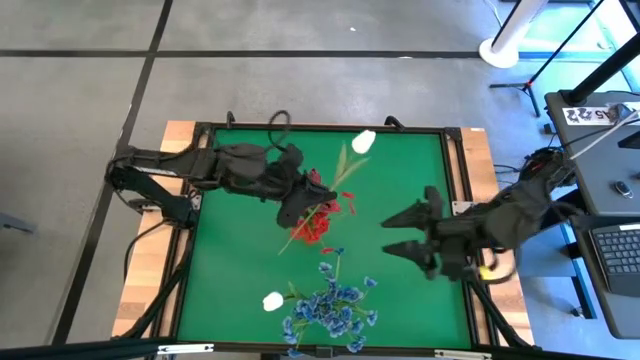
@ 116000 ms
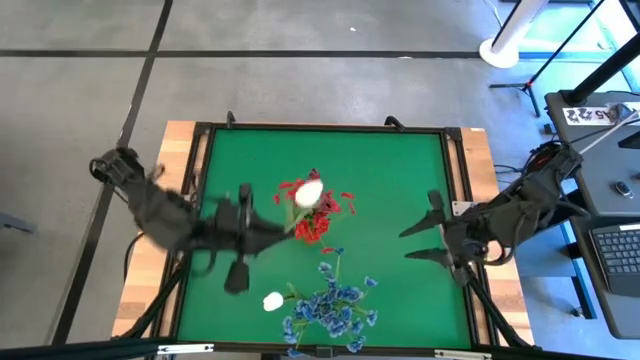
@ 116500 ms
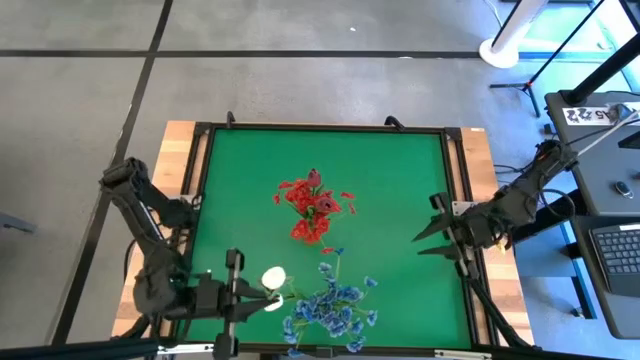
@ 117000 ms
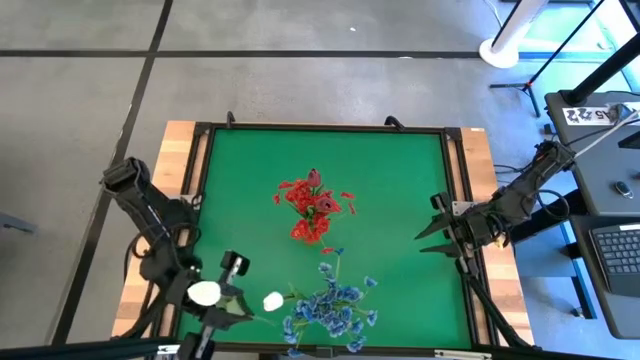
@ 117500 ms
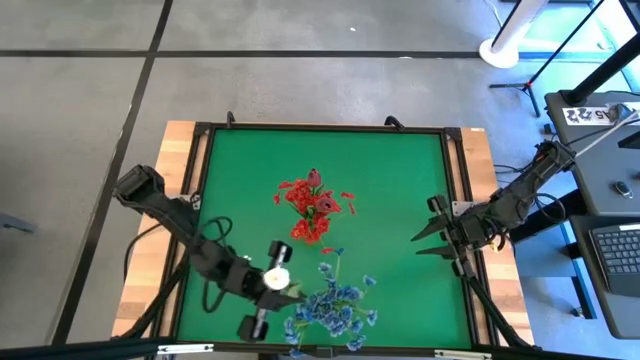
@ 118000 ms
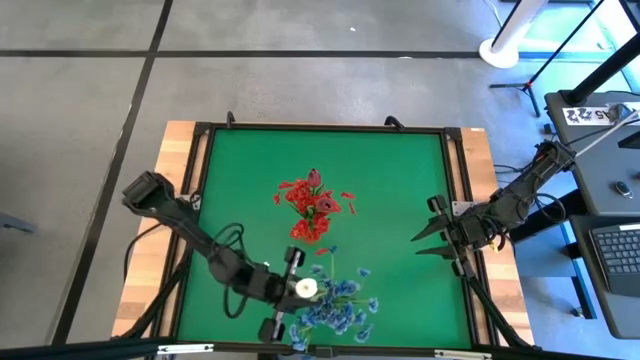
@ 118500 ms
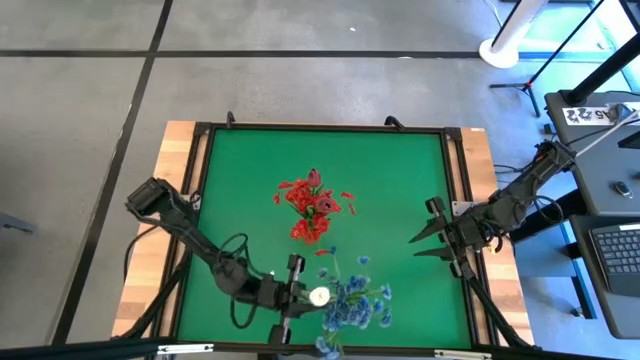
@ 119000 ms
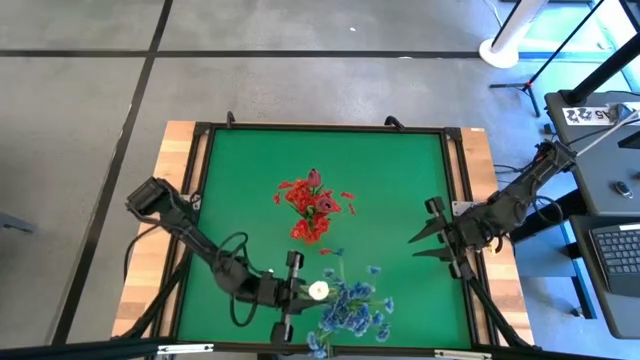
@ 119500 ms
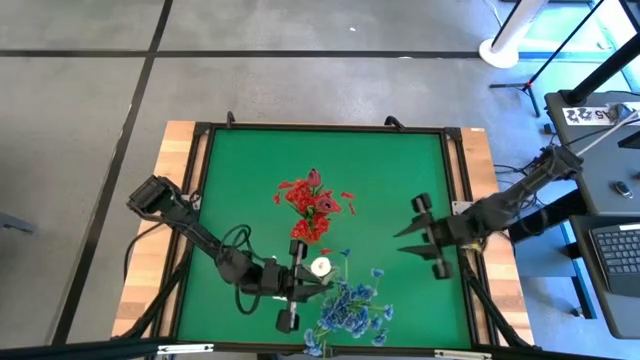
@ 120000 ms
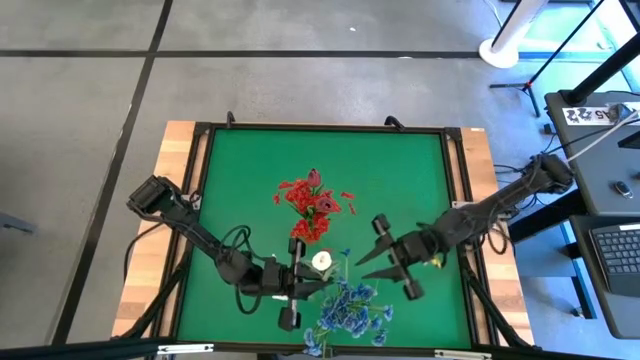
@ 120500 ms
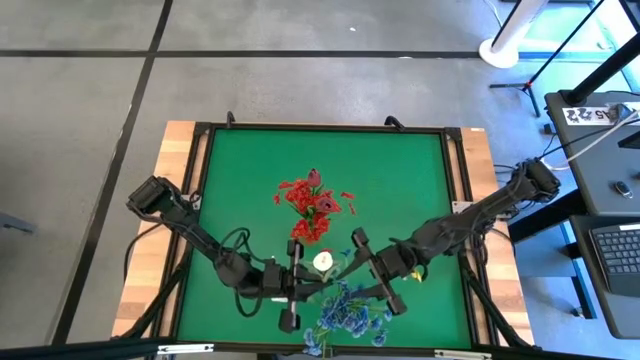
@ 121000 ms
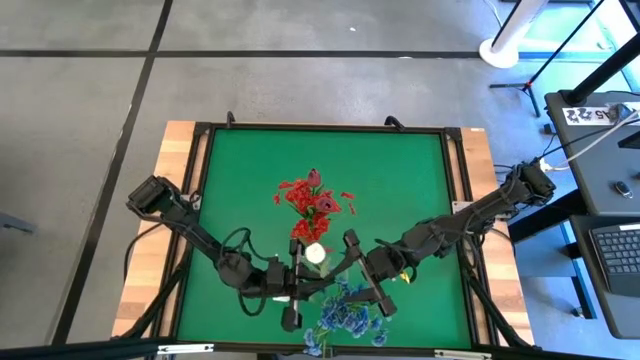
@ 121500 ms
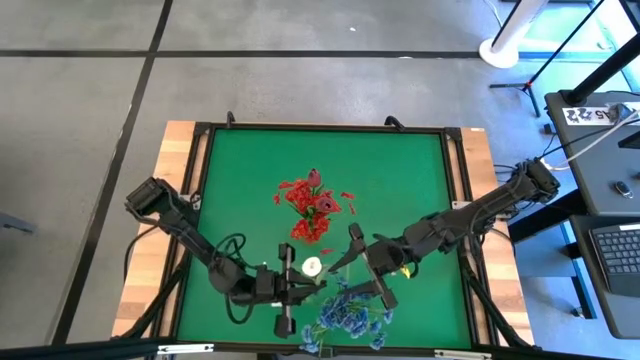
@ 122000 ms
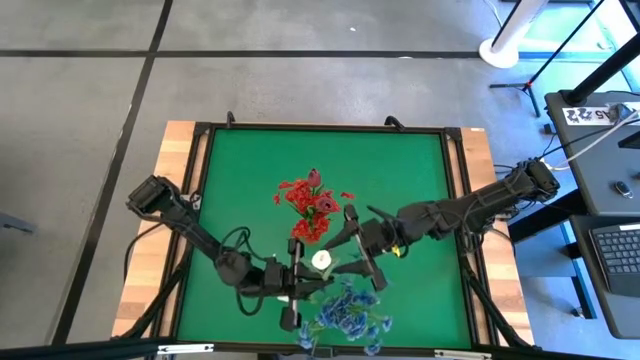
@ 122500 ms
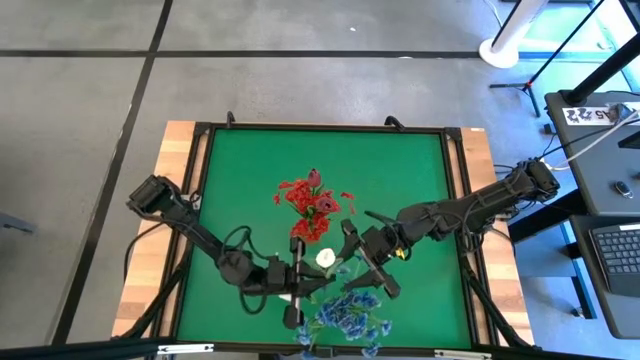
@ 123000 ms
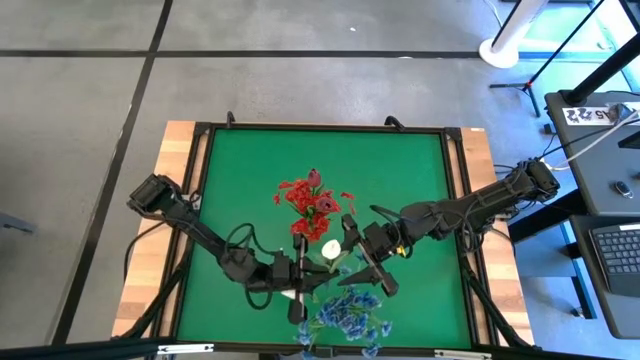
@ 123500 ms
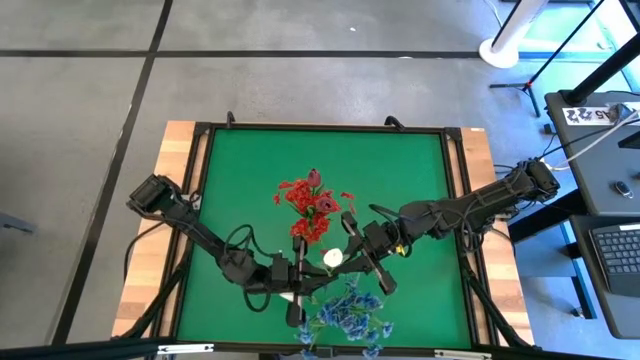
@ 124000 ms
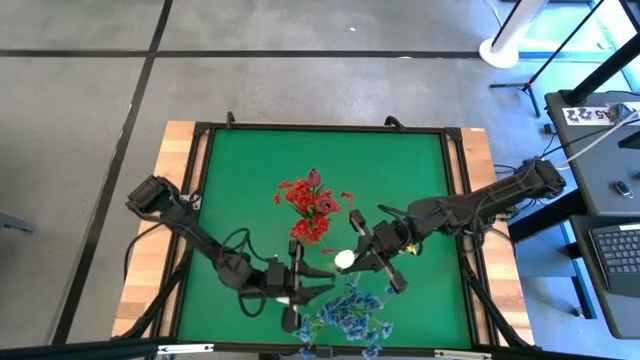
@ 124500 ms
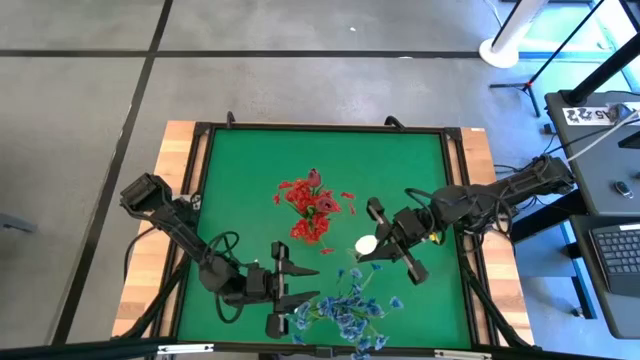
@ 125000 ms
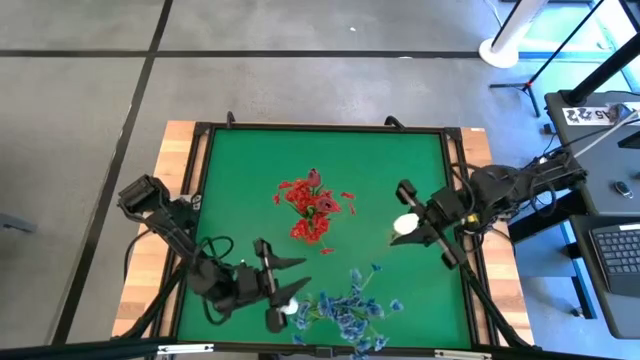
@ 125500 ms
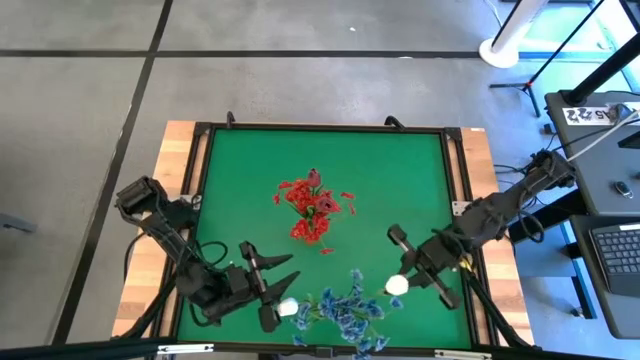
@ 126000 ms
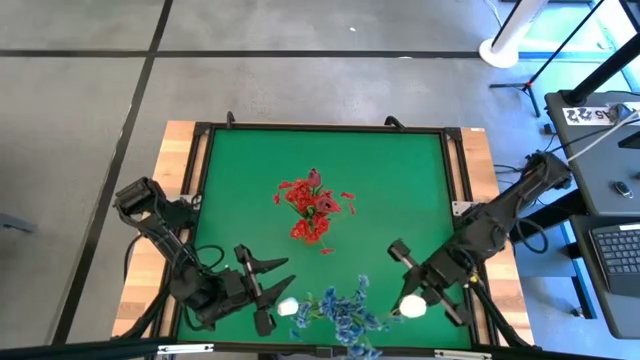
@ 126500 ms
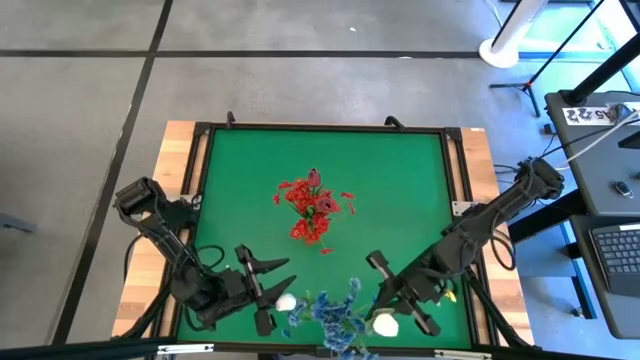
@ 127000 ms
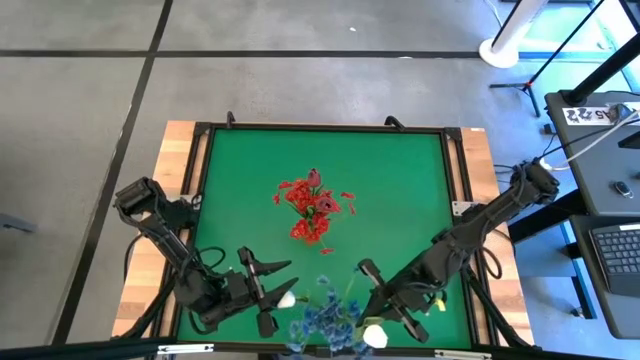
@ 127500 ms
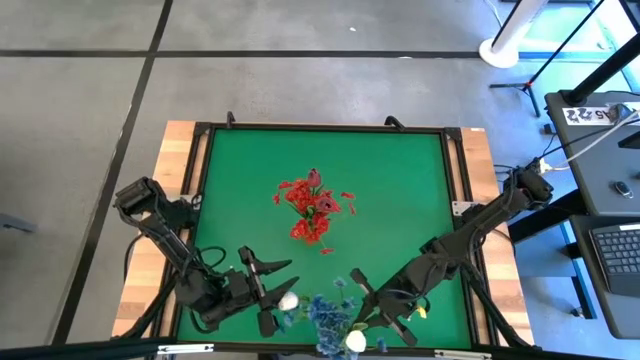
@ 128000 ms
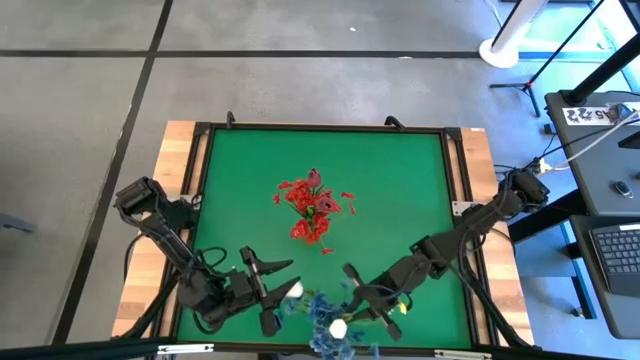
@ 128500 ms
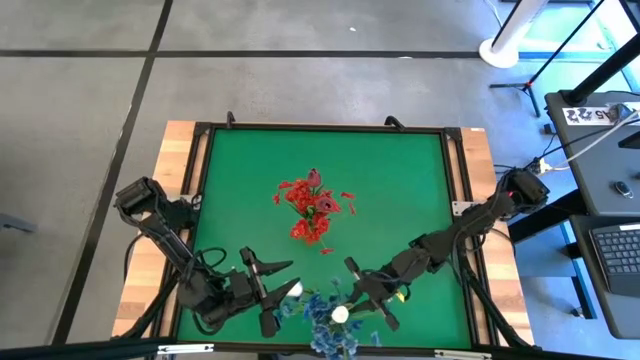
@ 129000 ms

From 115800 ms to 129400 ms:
Task: Sort flowers into vase by color
Put the white tulip into the transparent vase

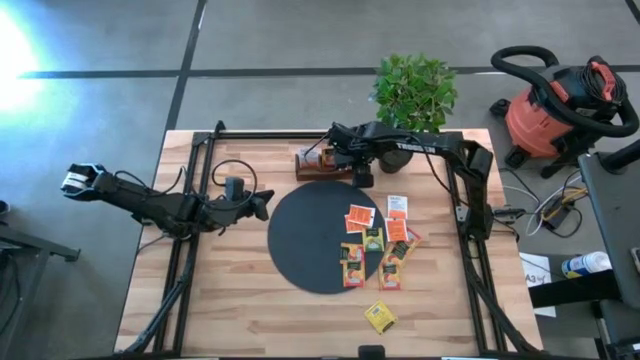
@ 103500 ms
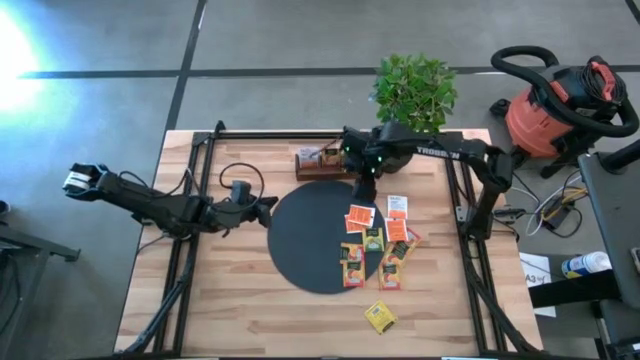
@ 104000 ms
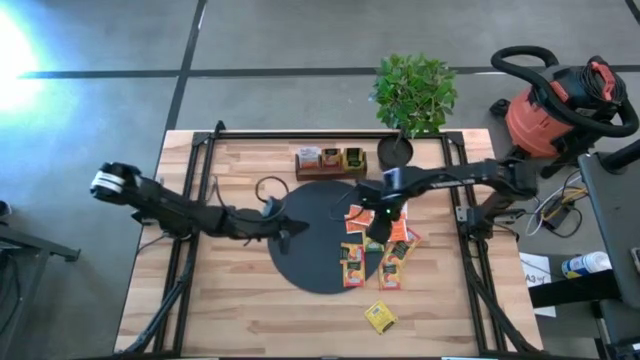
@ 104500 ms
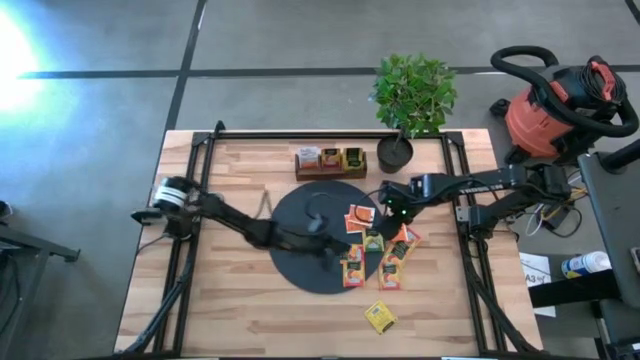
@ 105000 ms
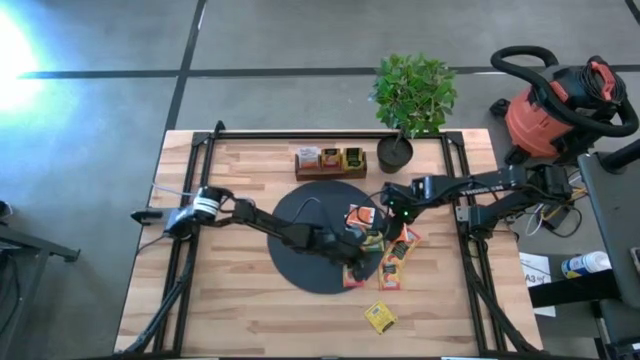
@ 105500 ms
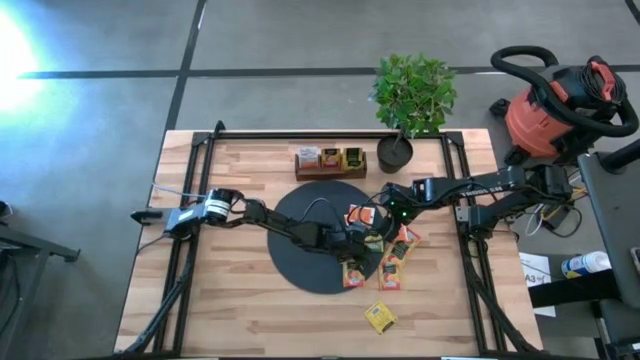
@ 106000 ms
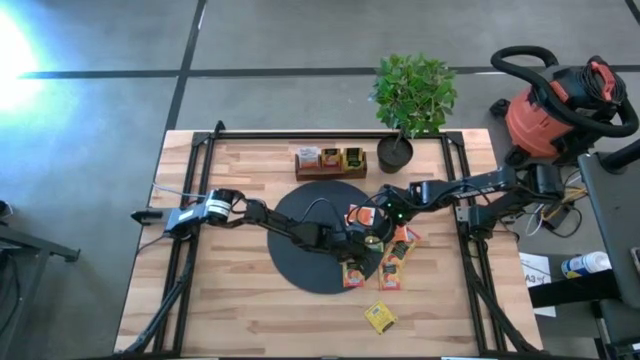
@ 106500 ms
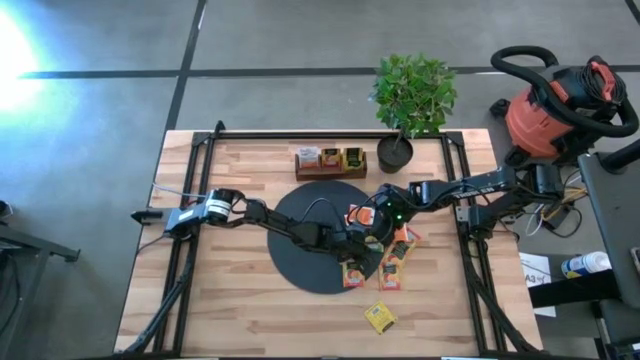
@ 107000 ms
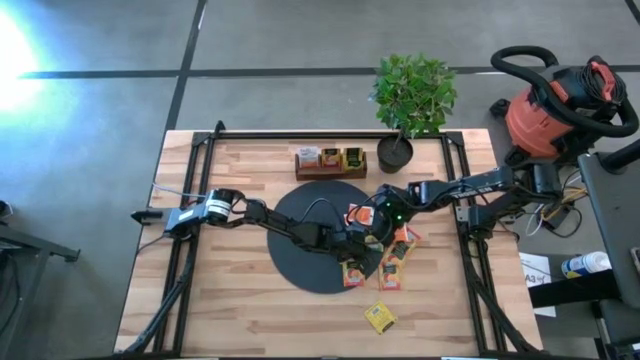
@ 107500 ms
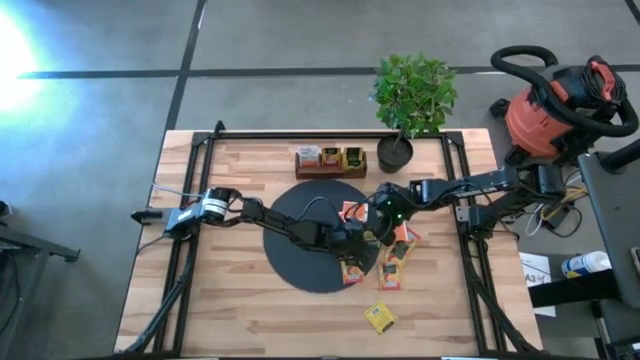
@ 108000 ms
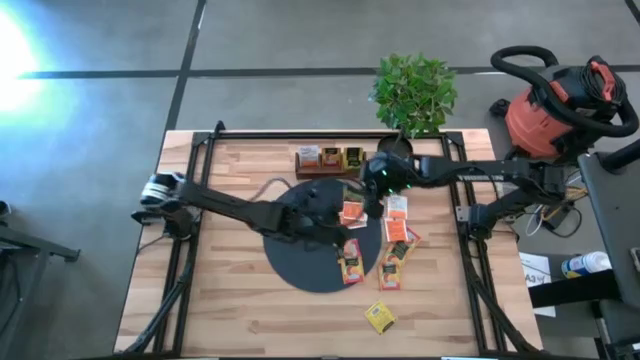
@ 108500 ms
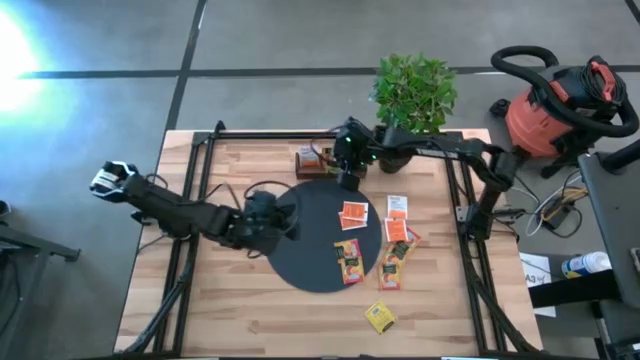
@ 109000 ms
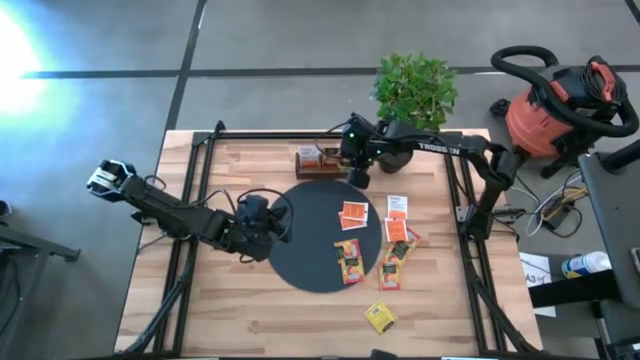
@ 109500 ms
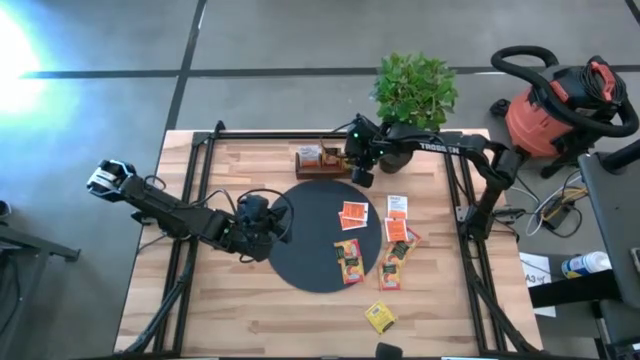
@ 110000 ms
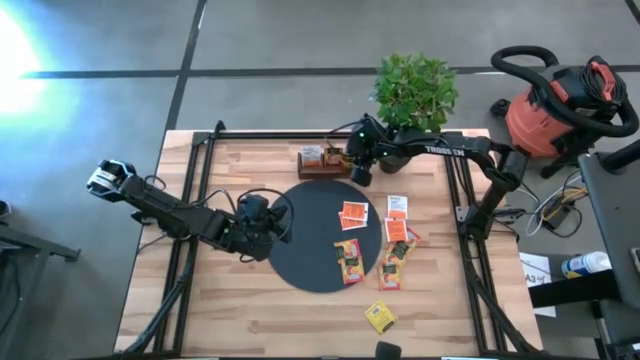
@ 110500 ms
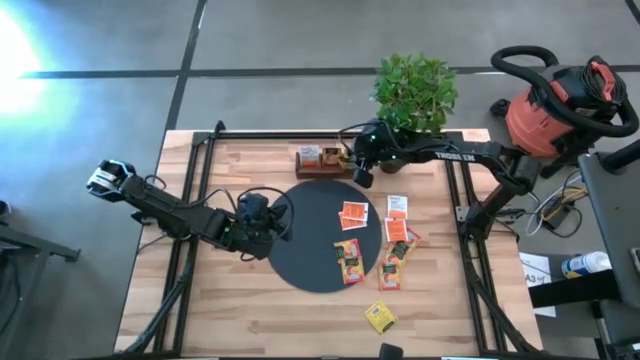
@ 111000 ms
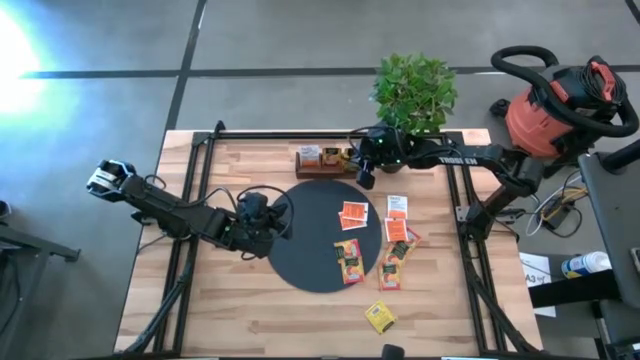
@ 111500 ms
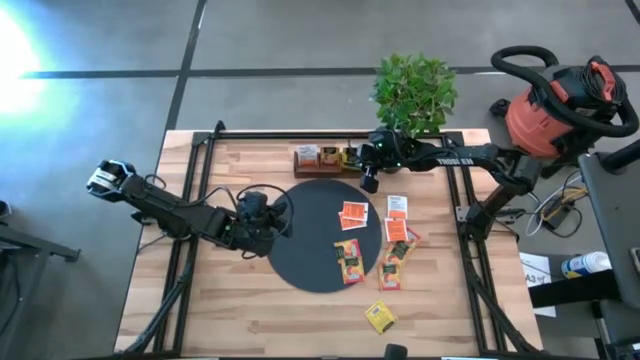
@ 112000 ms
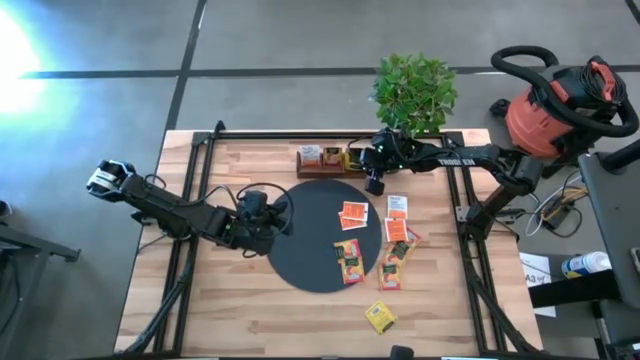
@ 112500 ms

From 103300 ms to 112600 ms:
Task: Pick & Place Tea
Put the yellow tea bag into the right section of the brown wooden organizer
